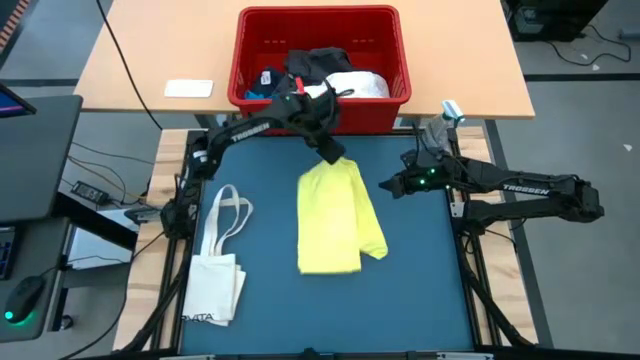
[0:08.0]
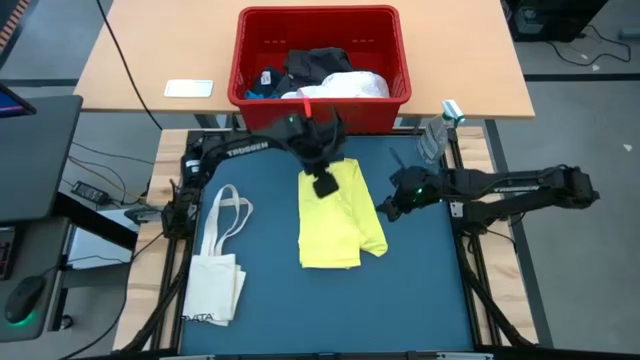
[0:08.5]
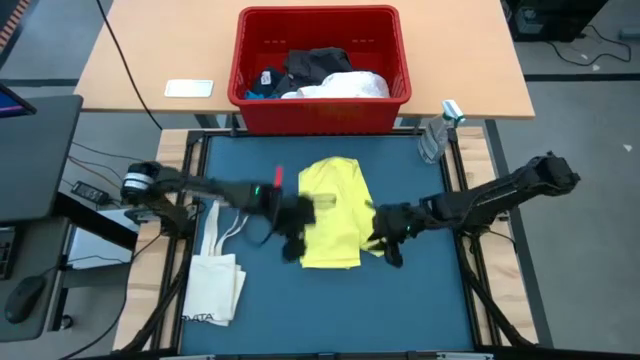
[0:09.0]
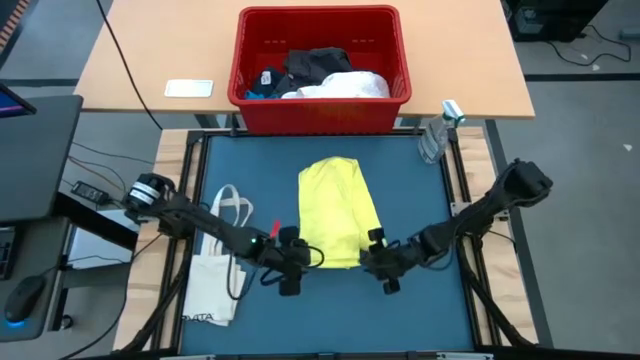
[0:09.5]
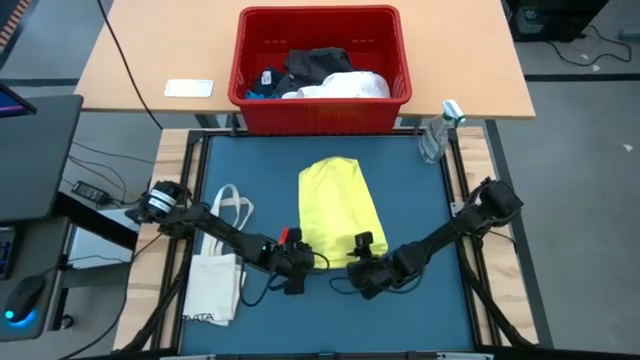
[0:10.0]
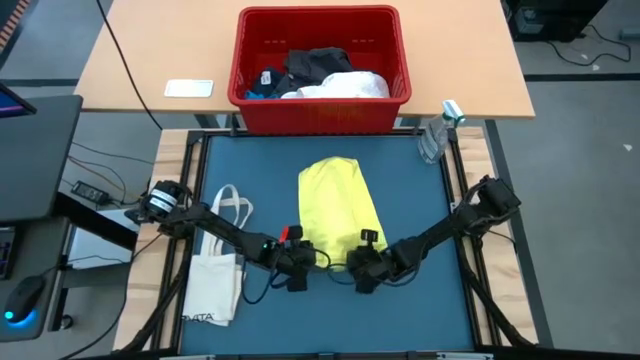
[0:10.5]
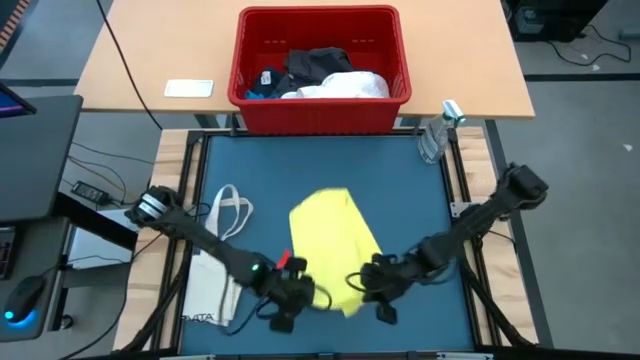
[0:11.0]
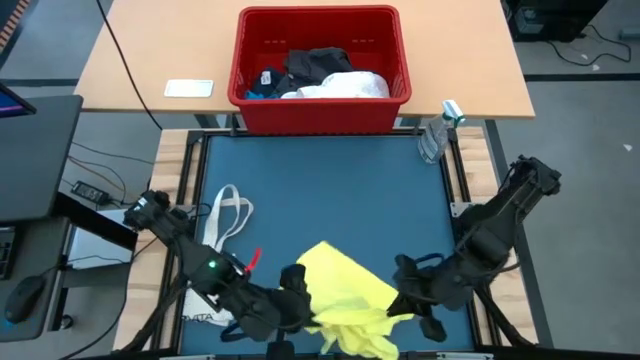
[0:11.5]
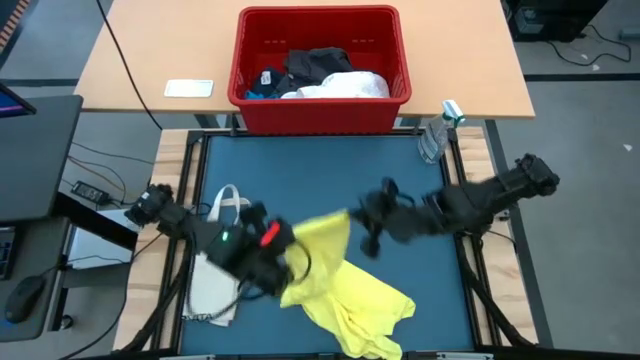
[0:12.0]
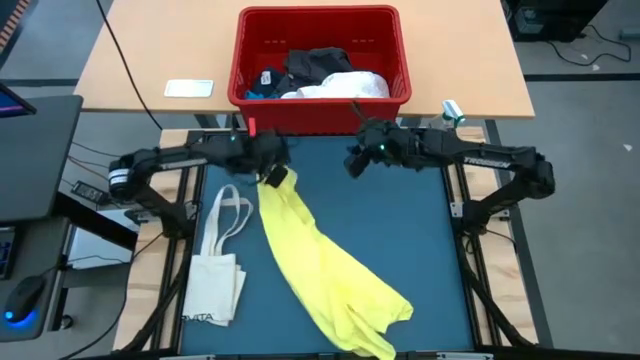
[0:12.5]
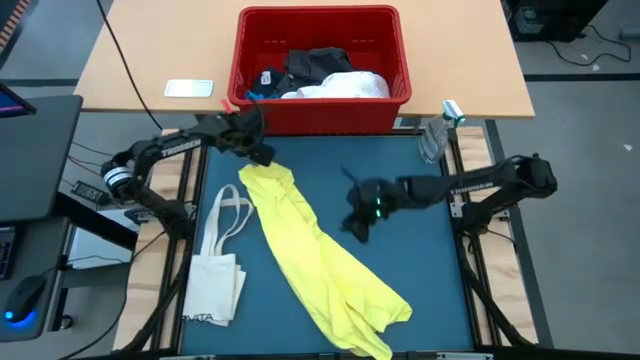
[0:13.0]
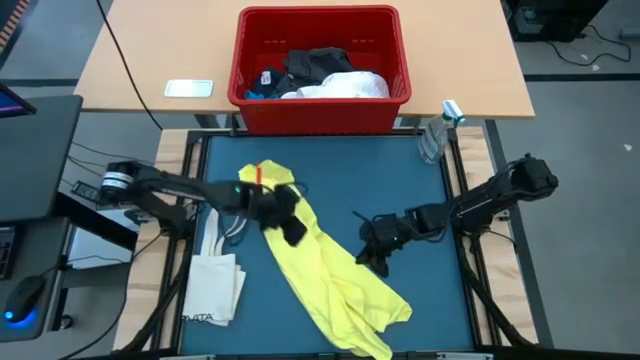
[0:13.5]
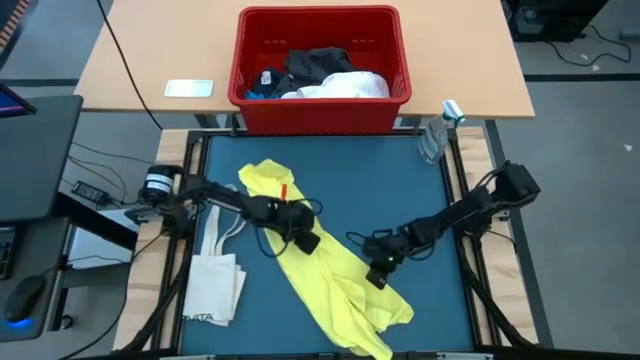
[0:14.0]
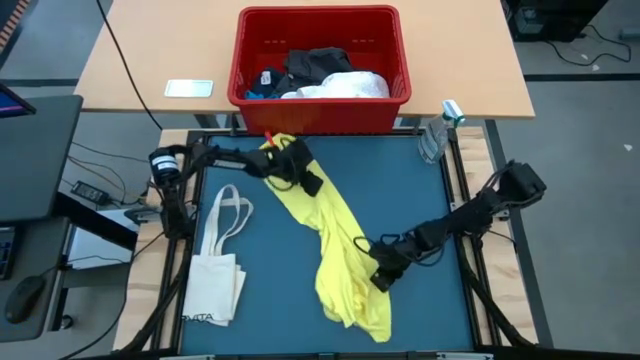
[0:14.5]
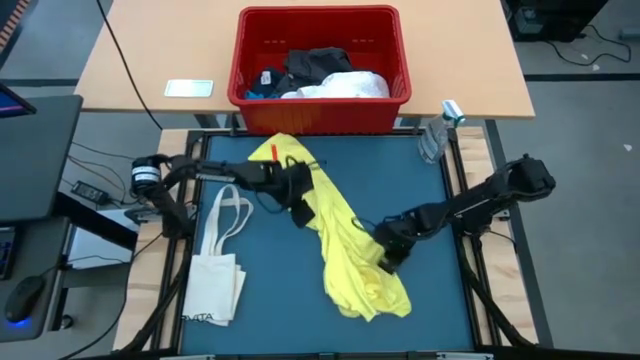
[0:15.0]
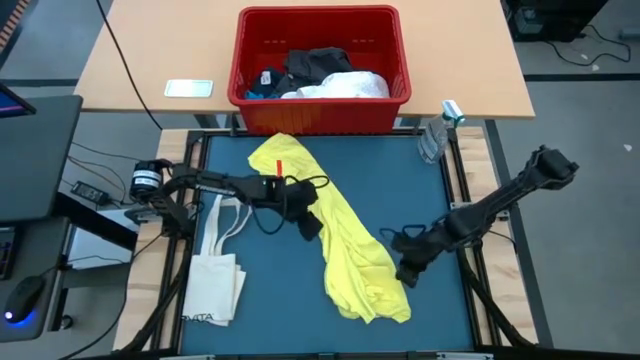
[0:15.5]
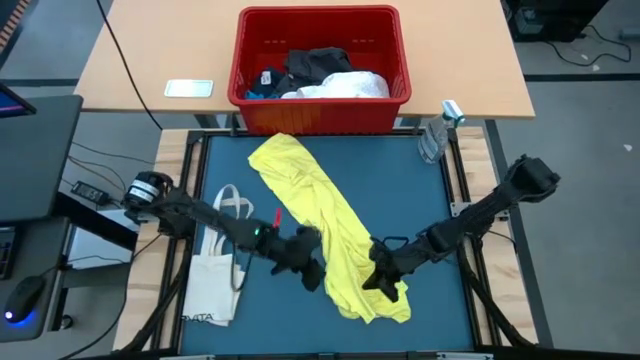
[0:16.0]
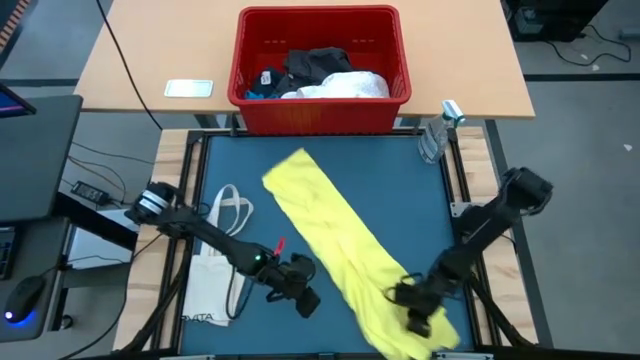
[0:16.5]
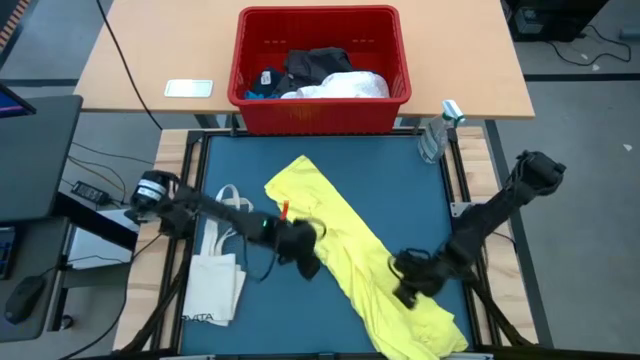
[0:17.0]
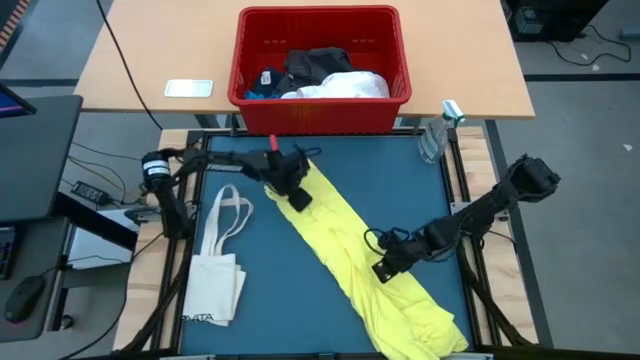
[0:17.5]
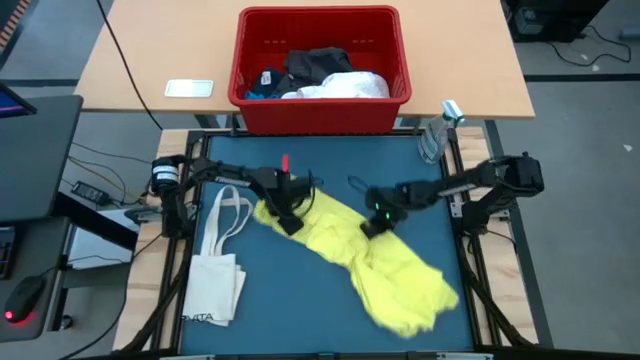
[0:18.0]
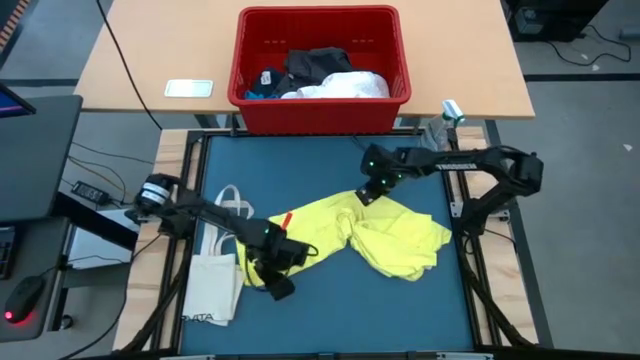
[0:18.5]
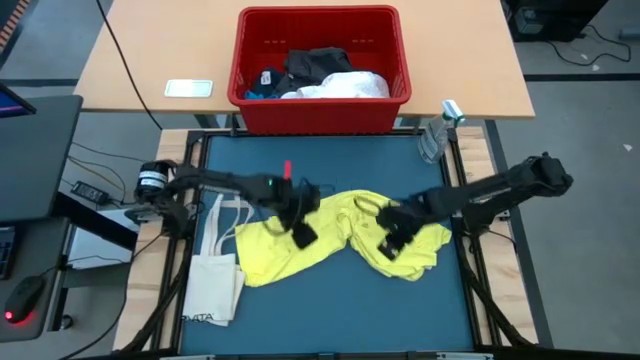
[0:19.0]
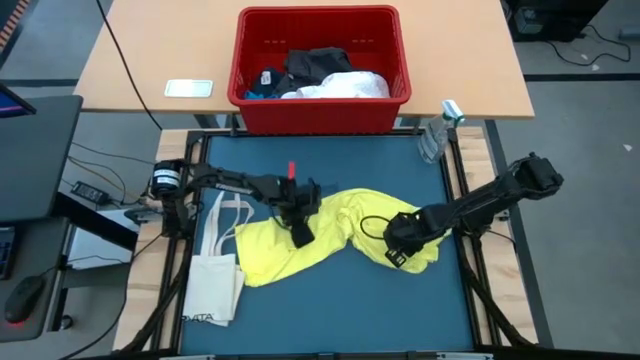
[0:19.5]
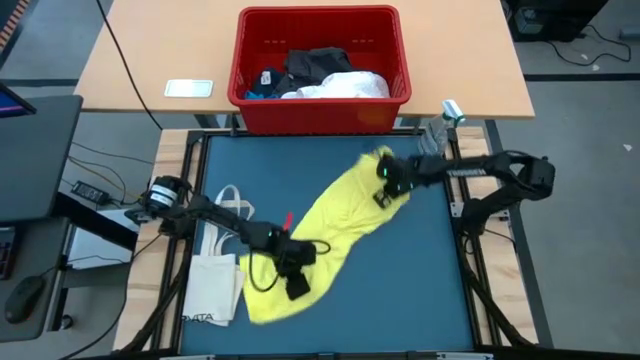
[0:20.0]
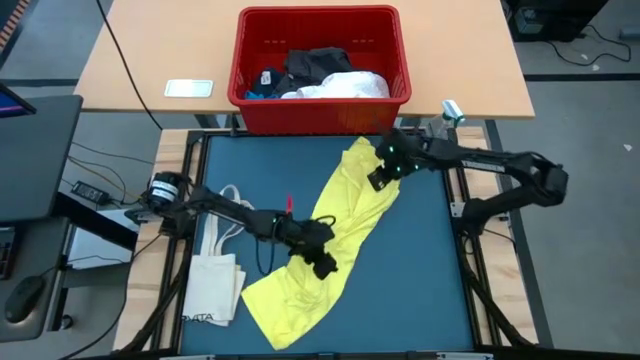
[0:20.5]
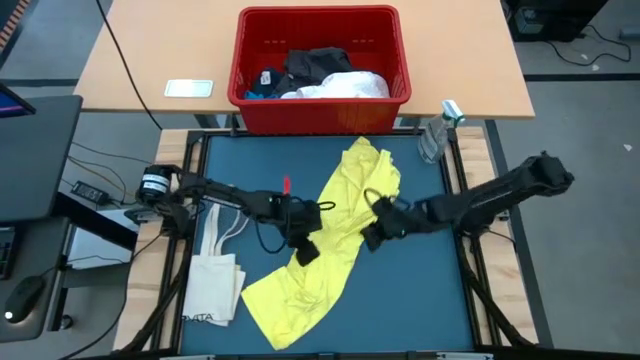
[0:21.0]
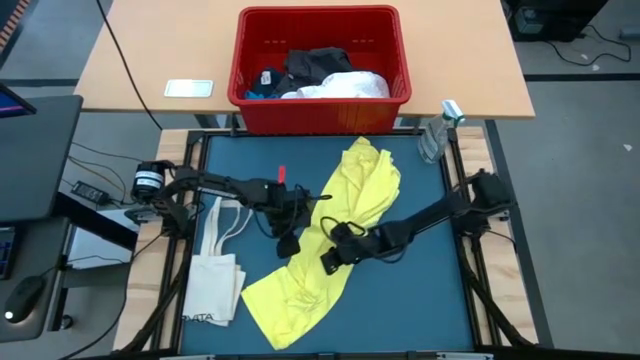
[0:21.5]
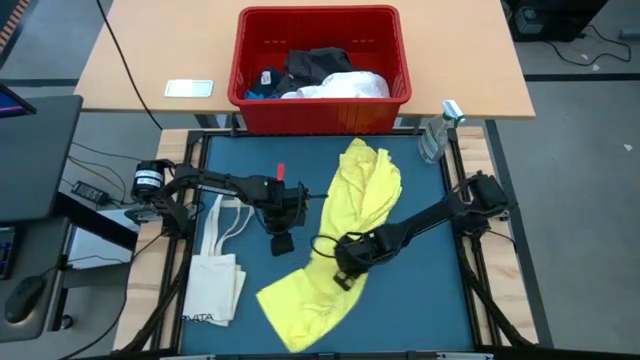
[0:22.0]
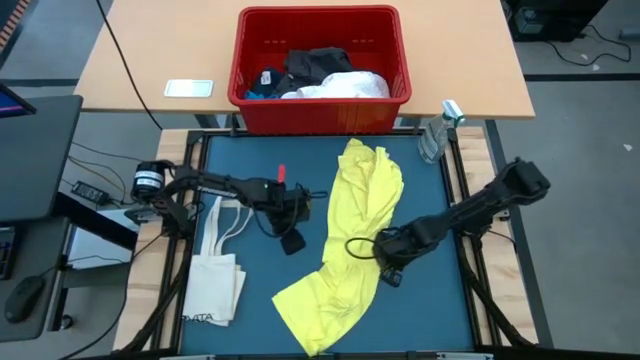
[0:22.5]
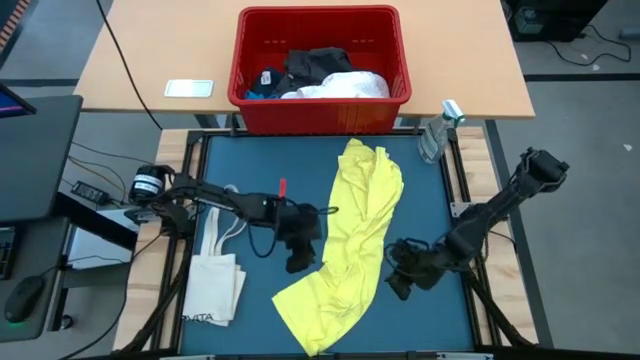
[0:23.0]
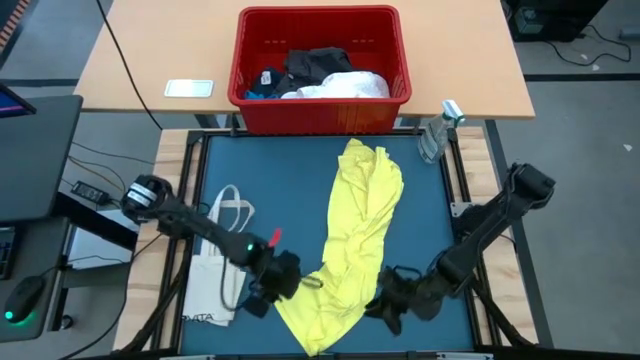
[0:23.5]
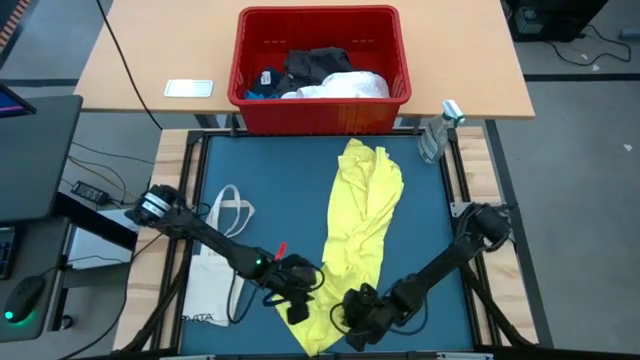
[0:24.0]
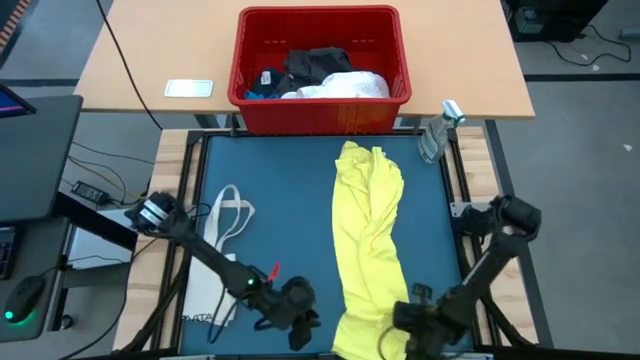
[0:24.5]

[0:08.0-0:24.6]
Task: Fold laundry
Fold the yellow shirt

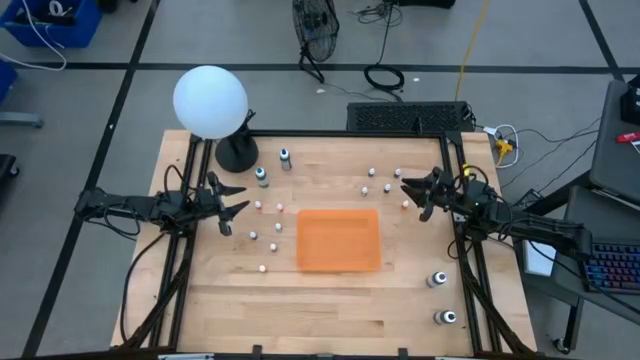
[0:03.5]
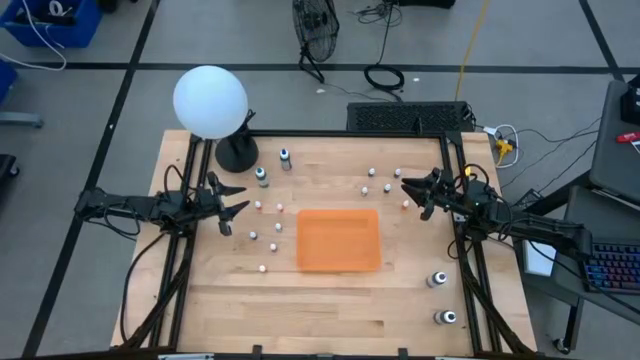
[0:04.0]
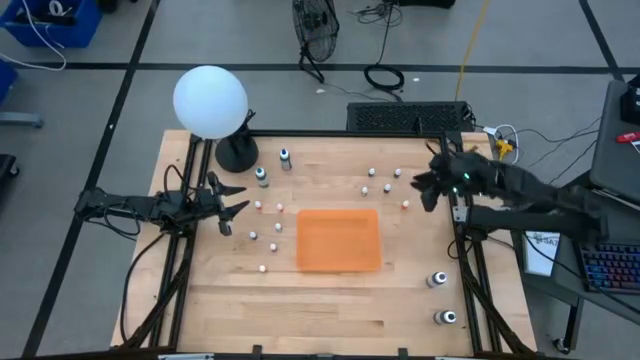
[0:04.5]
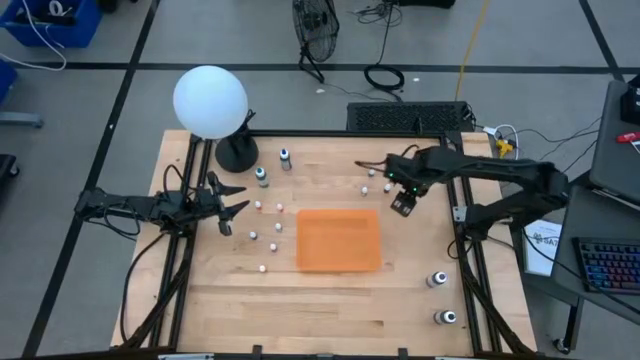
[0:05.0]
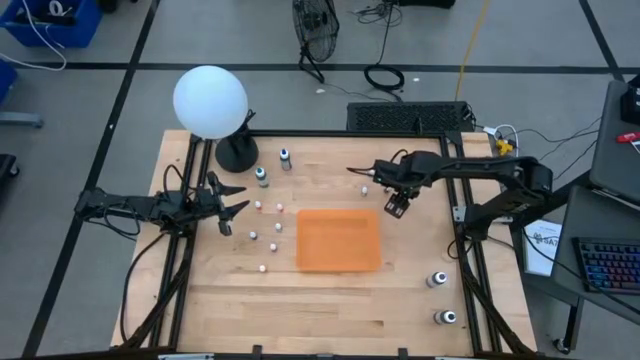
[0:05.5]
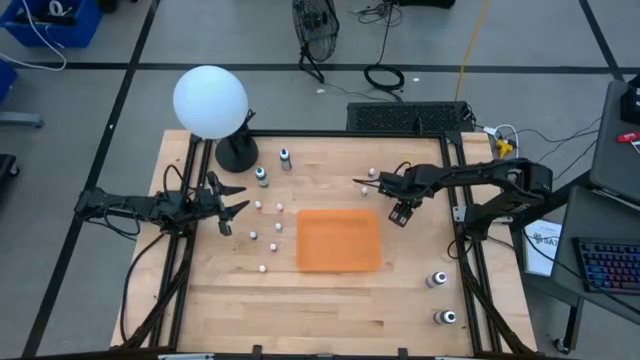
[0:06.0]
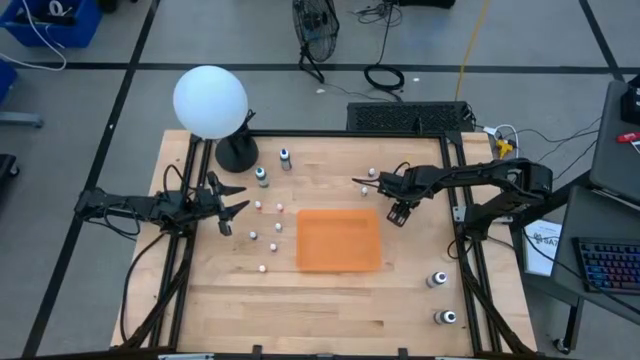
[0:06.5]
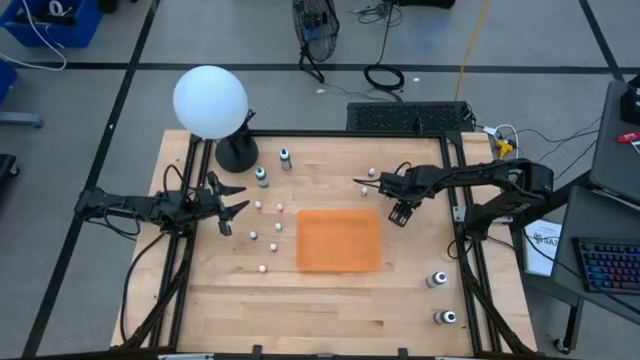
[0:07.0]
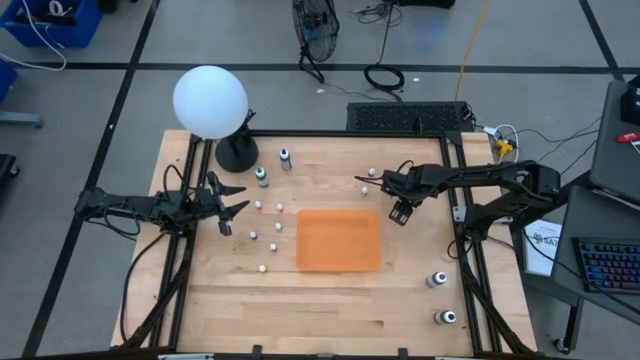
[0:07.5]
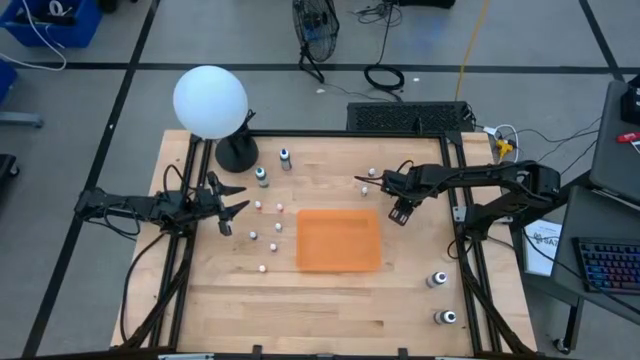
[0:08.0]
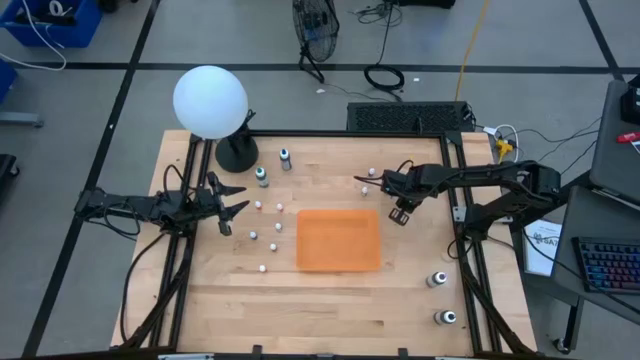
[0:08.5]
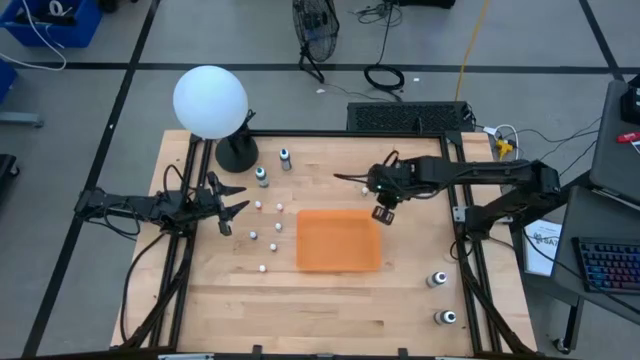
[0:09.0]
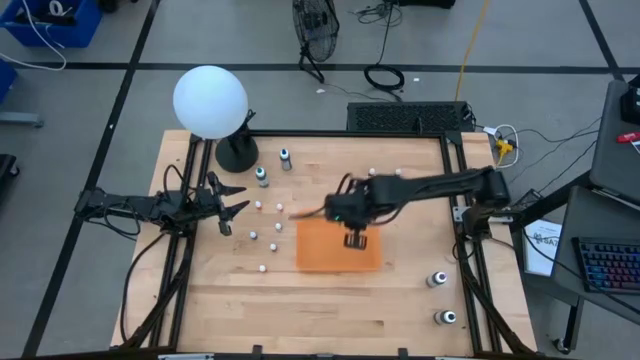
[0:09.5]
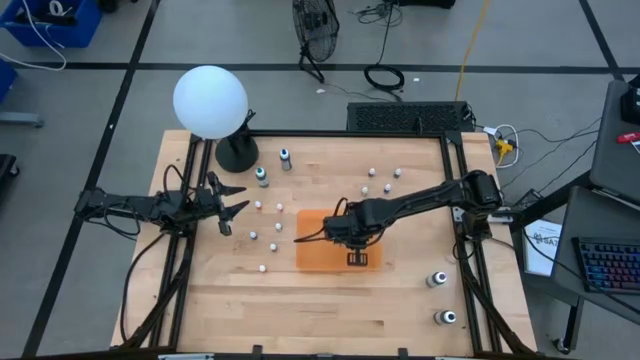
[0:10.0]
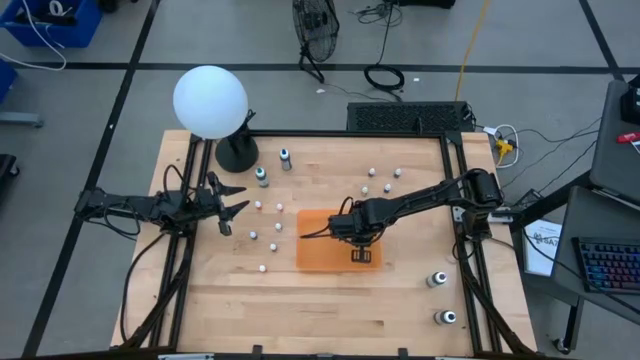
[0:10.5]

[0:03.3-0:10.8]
Task: Pick & Place food coloring
Put the small orange food coloring bottle into the container
